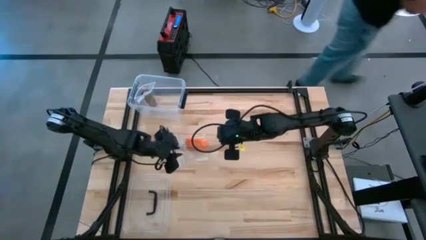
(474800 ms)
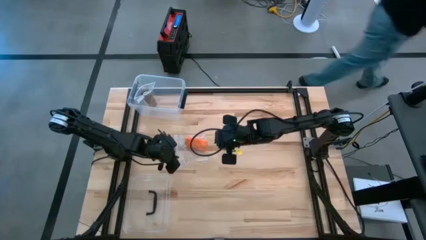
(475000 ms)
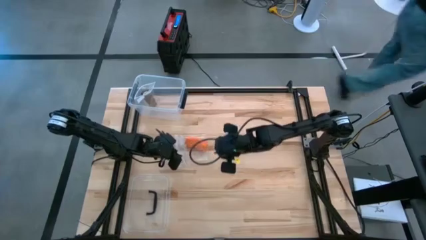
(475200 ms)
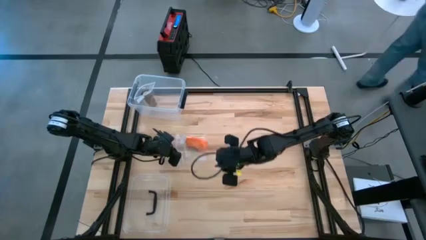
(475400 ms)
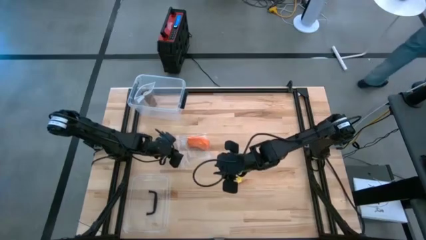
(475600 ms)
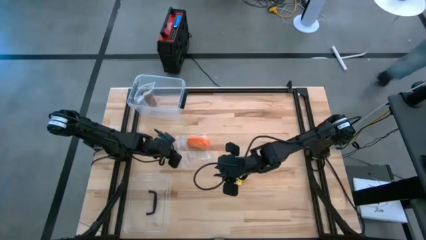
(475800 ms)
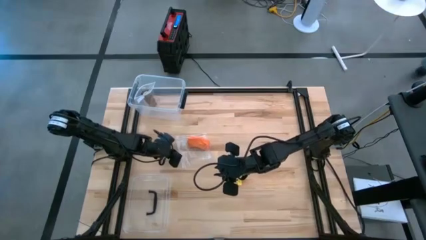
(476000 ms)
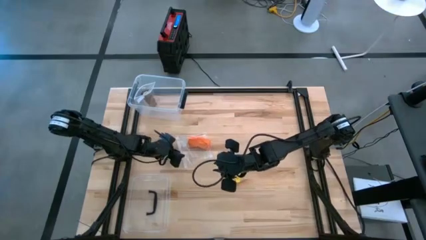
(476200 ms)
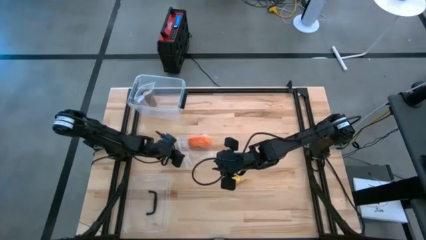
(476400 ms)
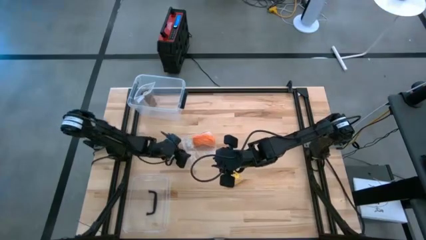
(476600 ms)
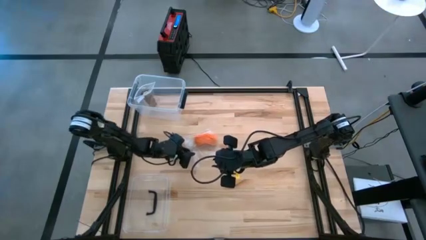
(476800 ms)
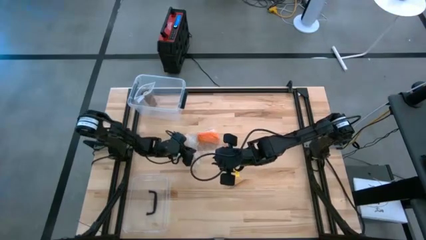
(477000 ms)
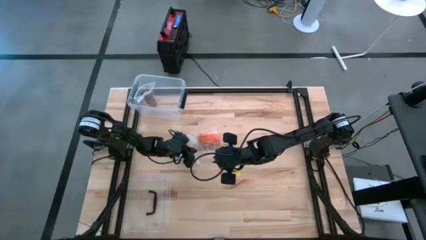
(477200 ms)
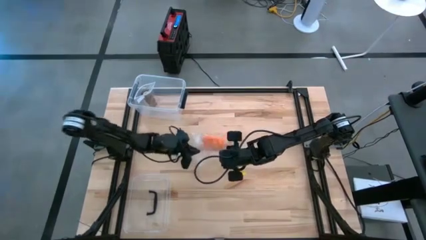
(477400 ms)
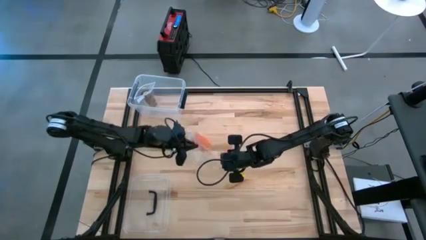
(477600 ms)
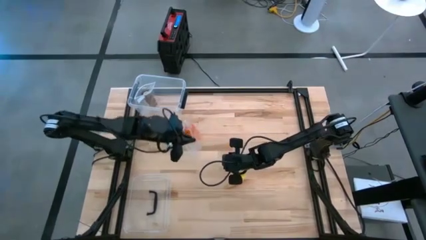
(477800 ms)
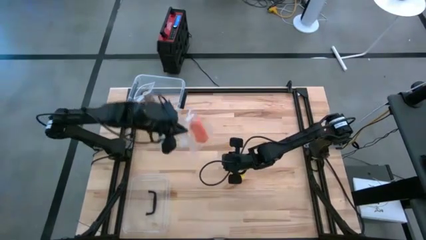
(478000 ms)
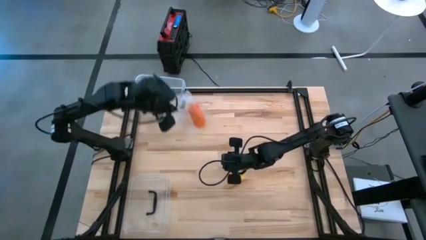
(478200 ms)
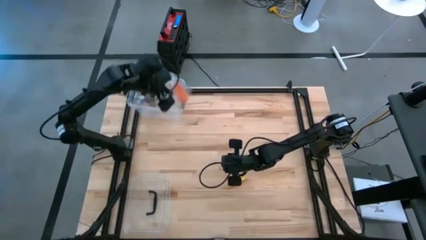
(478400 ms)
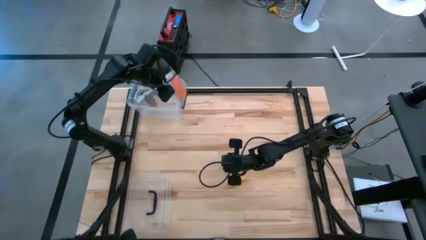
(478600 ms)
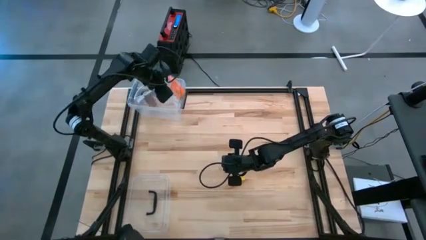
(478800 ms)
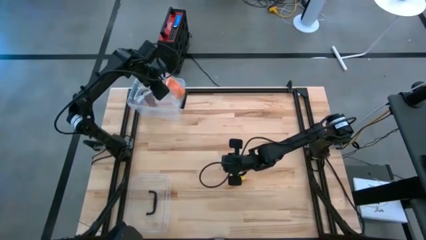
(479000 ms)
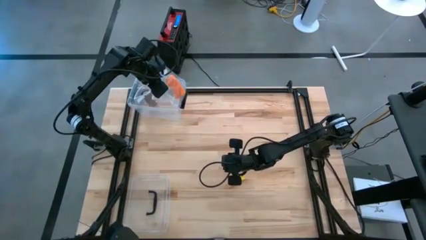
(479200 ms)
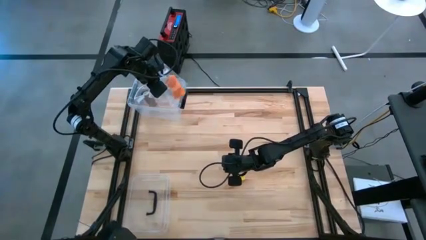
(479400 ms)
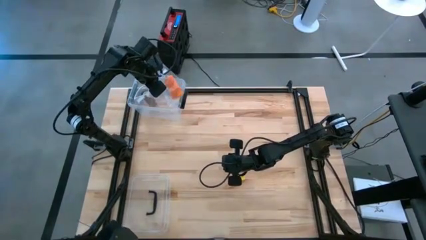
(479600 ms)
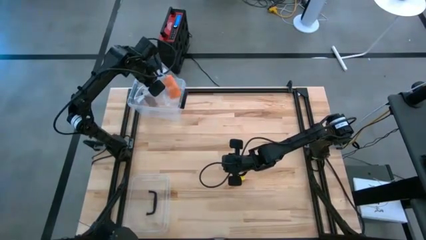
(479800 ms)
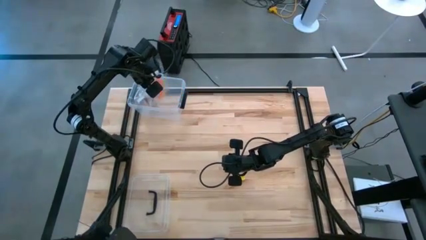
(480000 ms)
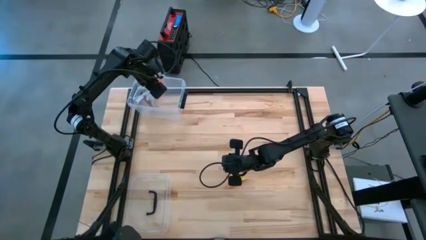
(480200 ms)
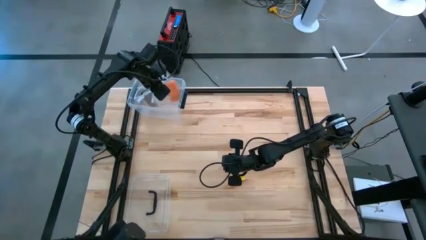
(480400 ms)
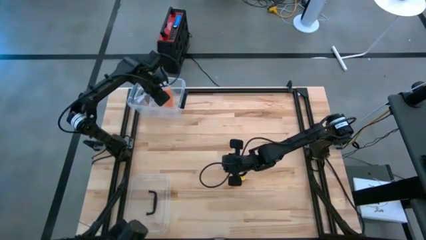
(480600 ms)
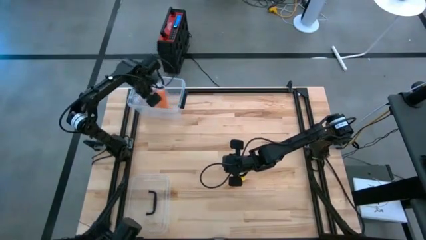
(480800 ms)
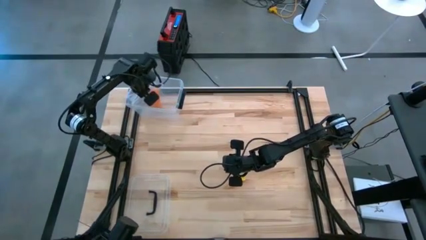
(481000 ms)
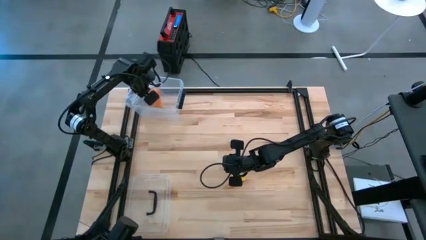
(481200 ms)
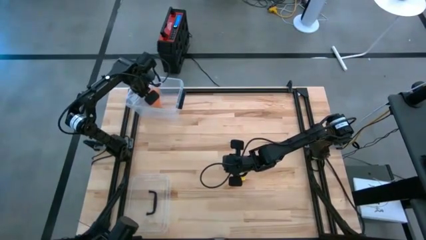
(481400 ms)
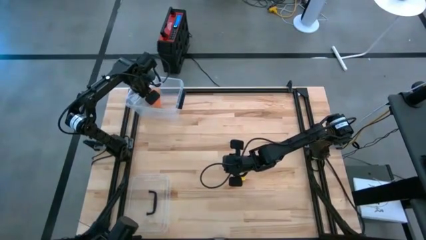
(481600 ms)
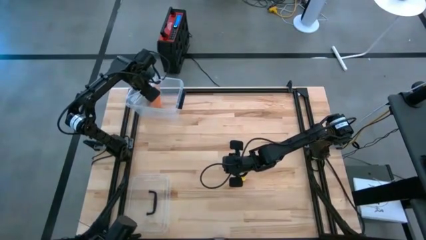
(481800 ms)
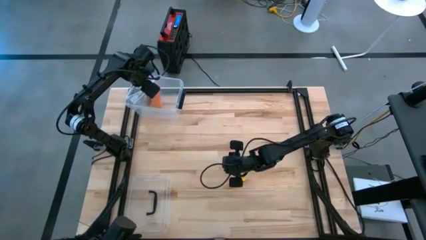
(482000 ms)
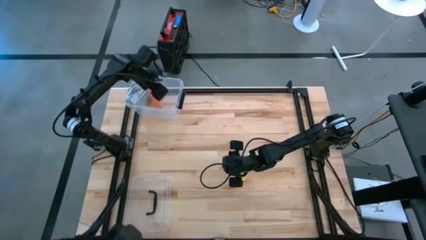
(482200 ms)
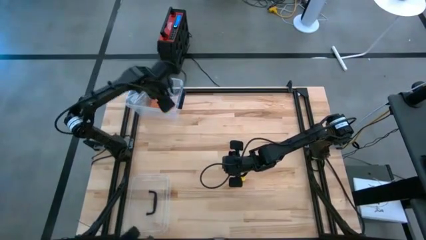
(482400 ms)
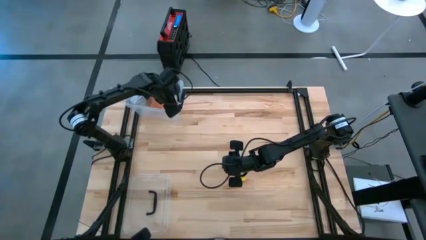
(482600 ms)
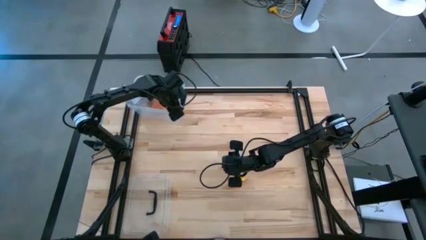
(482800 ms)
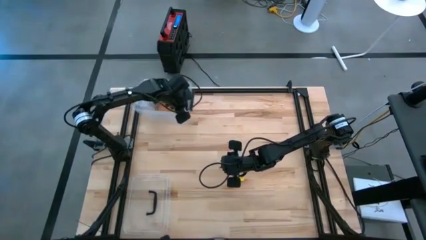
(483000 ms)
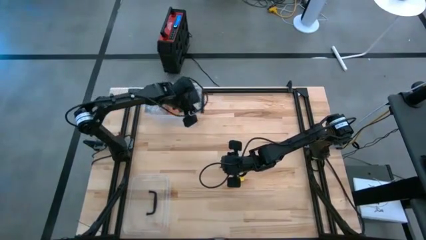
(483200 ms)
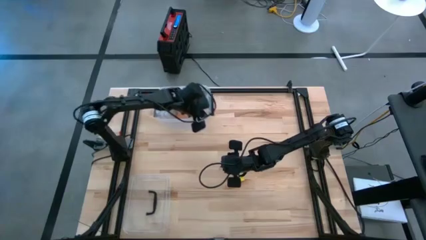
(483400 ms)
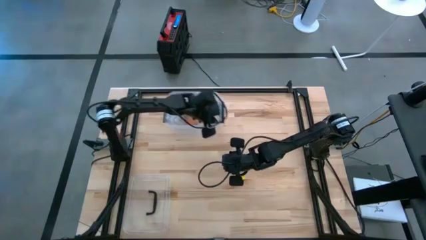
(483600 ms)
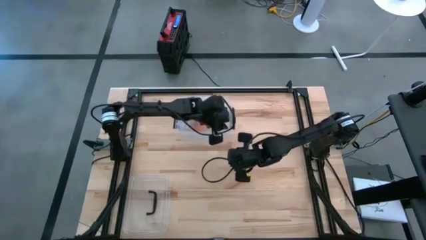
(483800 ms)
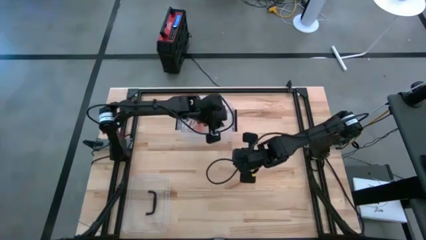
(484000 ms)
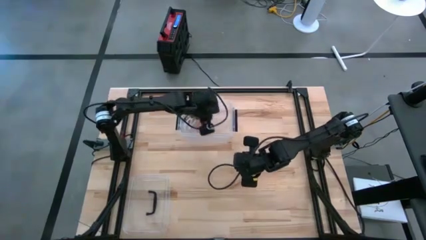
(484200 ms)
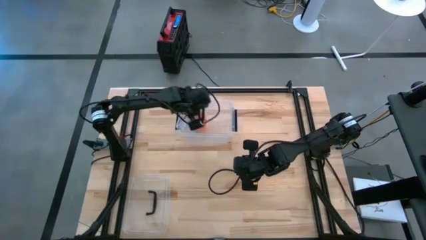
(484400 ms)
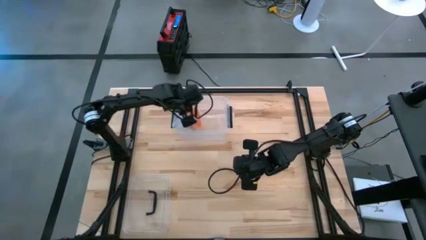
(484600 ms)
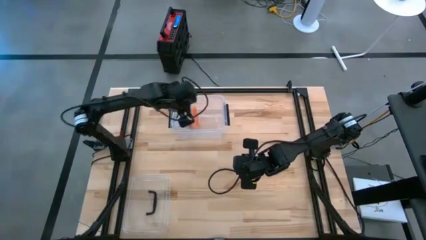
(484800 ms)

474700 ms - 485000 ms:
Task: Roll bandage
Put the rolled orange bandage into the zip bag

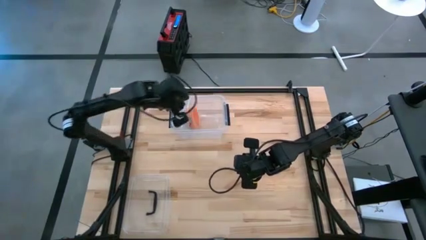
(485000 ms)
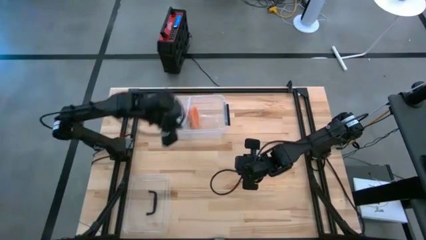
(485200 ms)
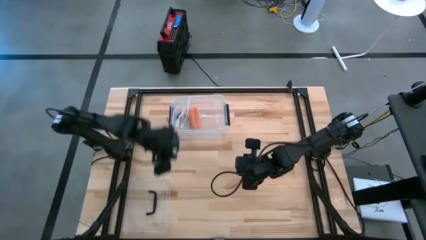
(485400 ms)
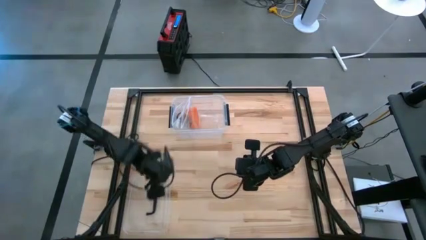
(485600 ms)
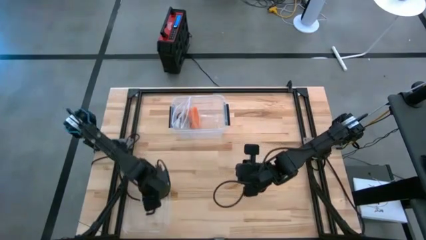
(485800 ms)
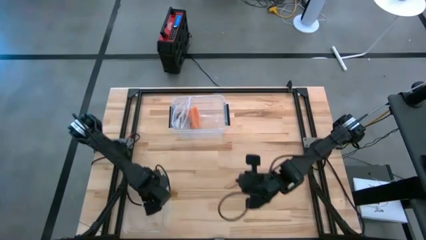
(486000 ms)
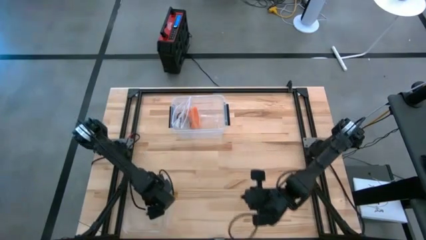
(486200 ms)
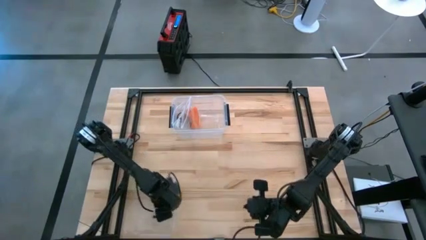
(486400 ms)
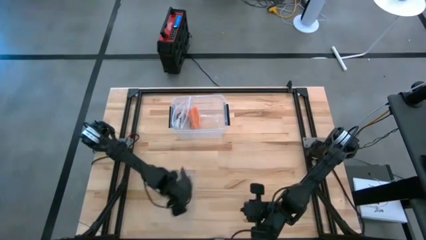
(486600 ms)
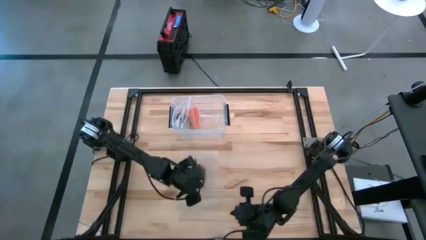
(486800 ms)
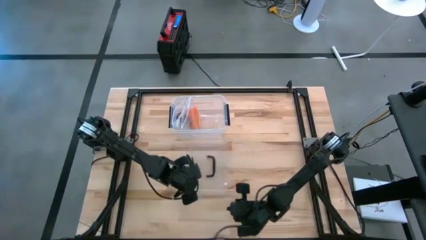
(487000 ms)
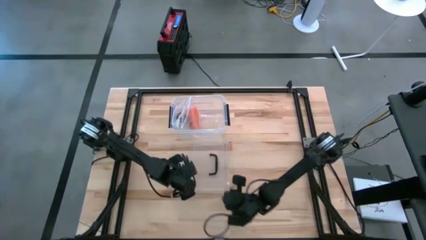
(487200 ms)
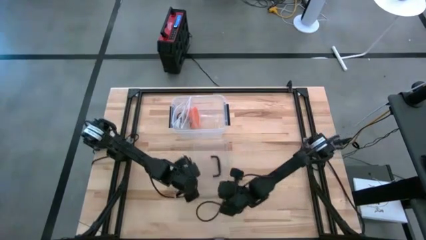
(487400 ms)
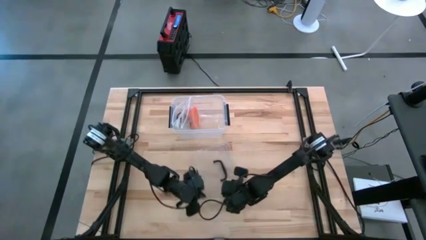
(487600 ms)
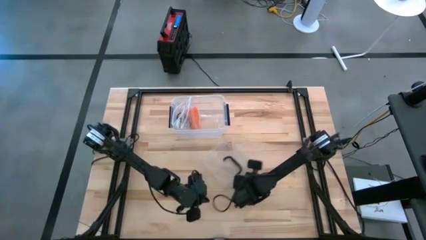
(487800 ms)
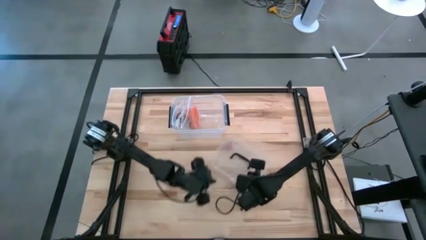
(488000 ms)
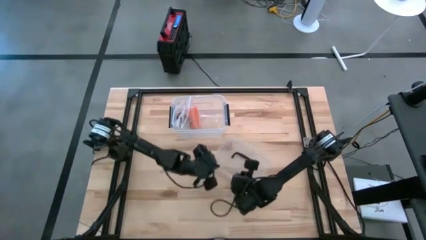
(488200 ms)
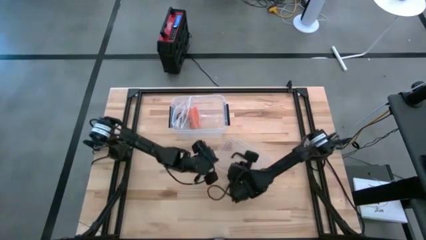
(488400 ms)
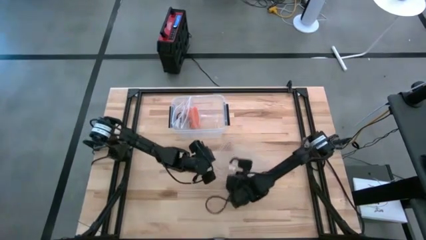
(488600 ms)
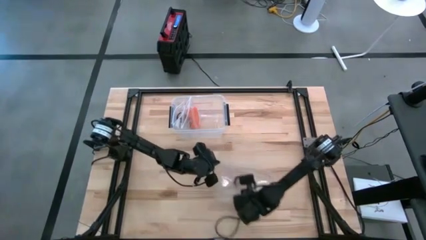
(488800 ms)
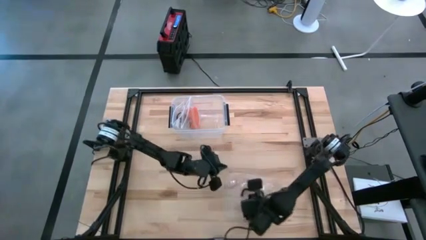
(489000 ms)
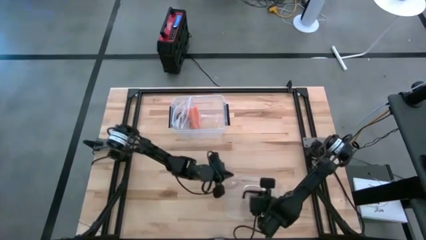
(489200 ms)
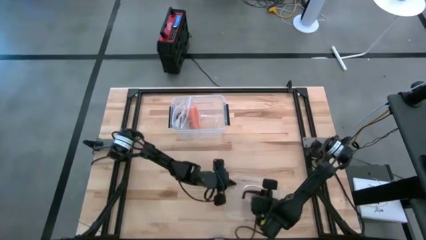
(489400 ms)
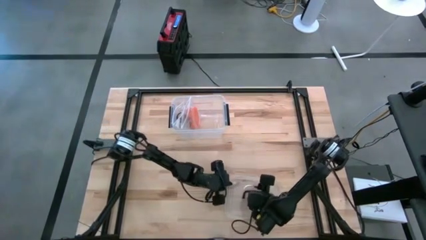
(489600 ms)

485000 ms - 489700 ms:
Close the transparent bin

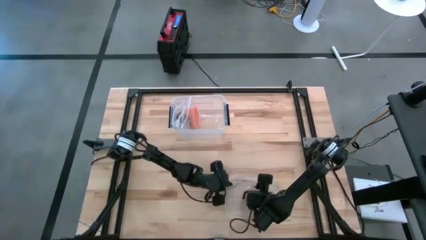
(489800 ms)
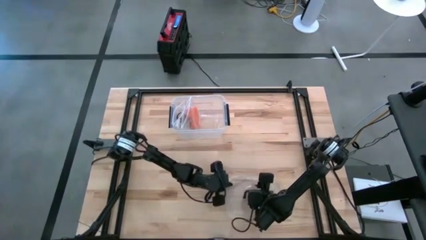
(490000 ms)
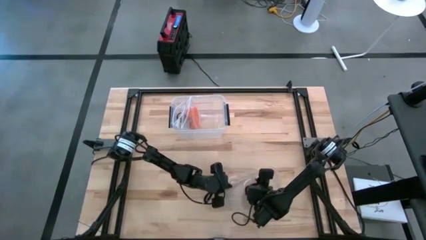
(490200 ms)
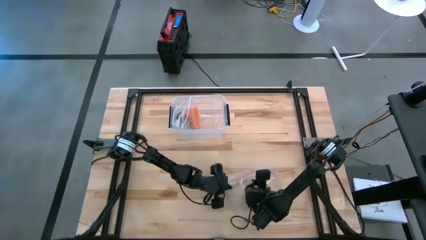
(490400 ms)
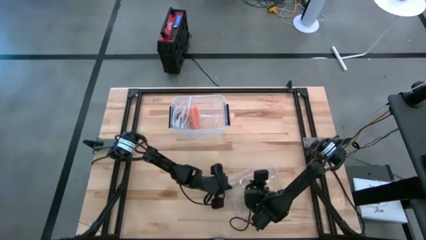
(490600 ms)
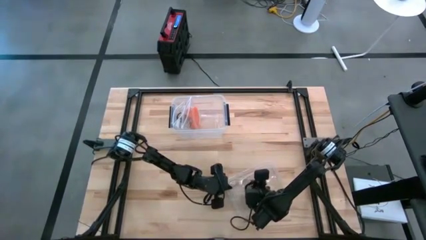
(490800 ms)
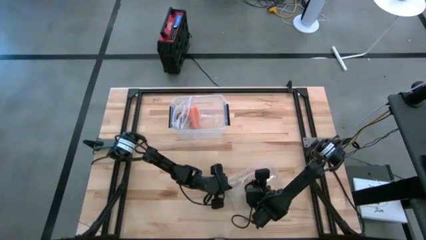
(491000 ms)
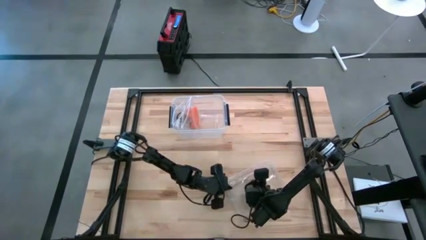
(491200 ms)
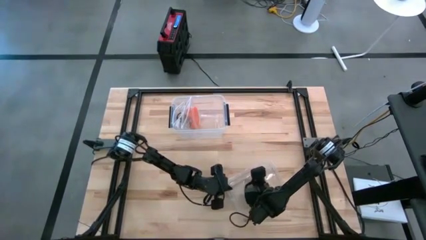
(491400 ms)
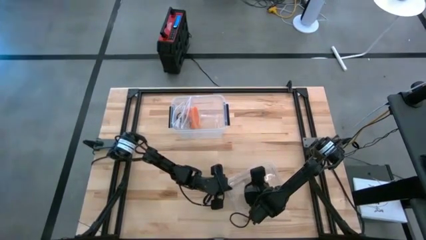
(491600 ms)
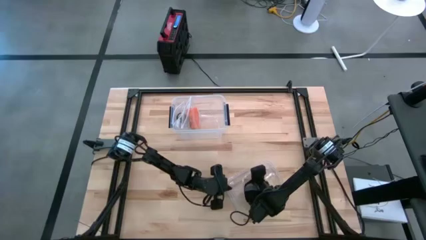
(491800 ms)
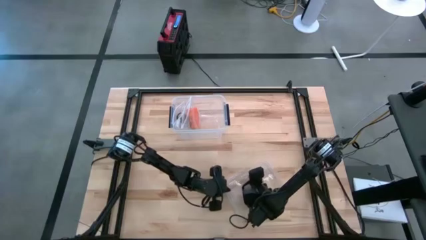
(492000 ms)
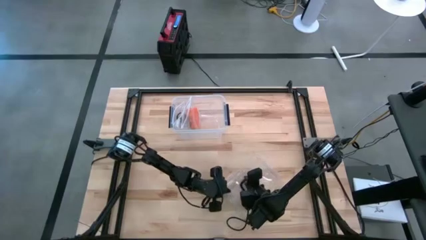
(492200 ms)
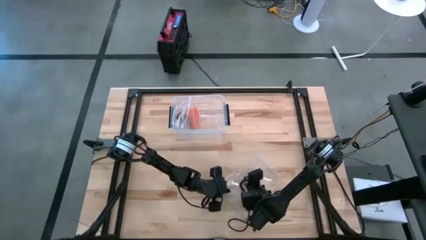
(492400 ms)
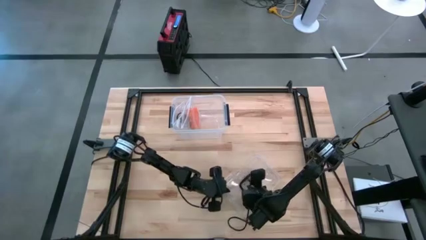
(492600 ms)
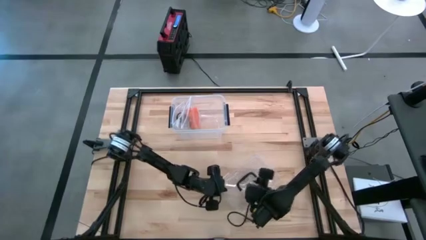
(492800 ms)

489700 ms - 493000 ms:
Close the transparent bin
